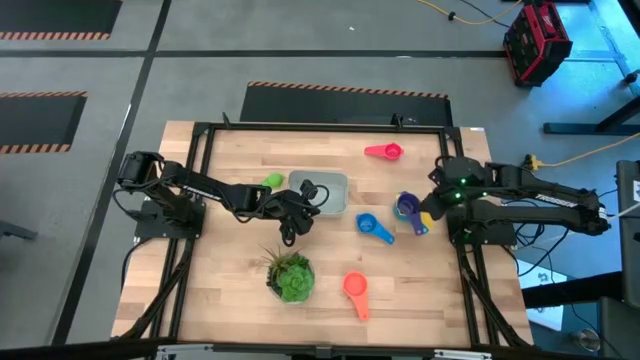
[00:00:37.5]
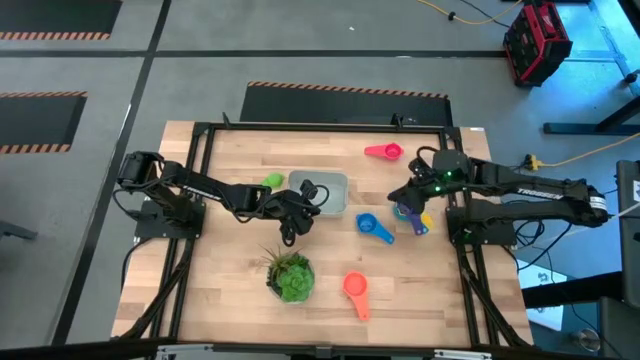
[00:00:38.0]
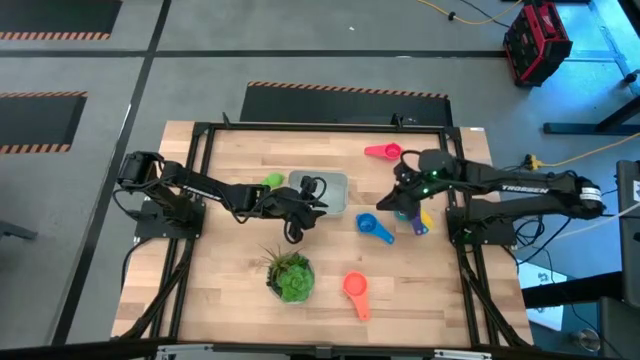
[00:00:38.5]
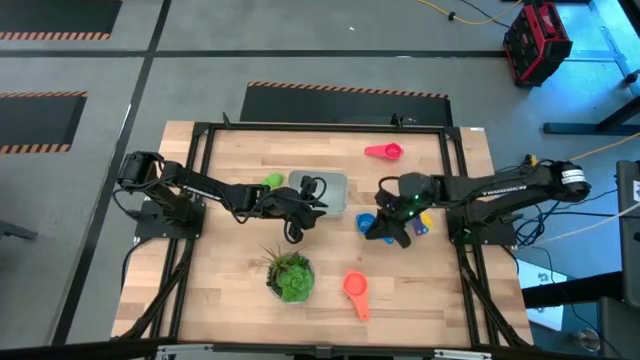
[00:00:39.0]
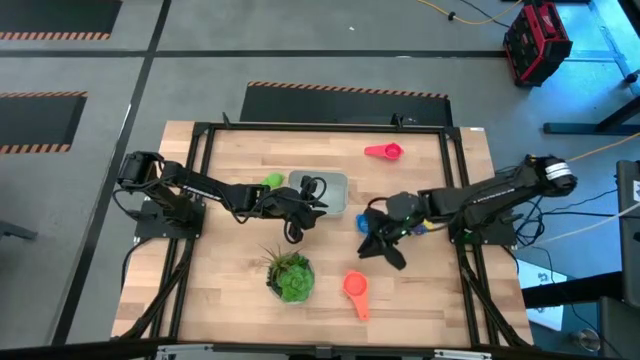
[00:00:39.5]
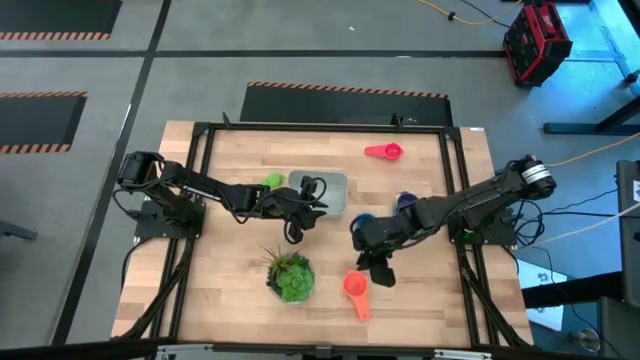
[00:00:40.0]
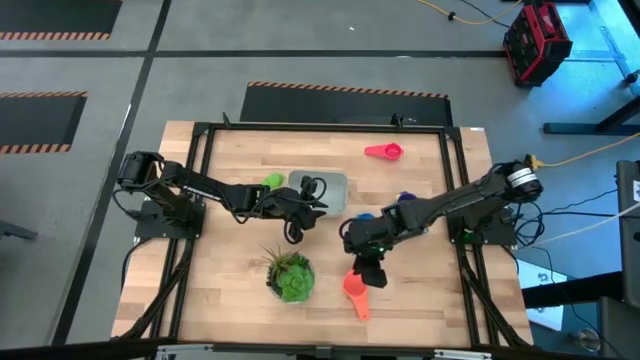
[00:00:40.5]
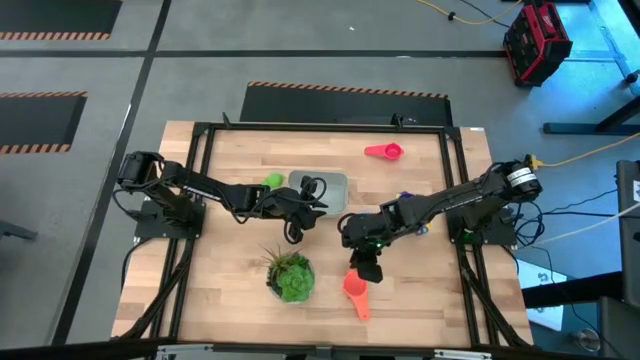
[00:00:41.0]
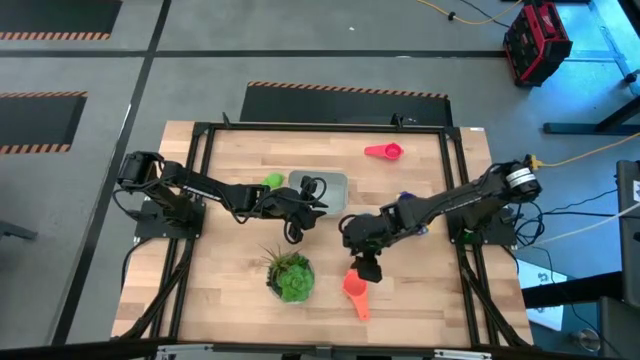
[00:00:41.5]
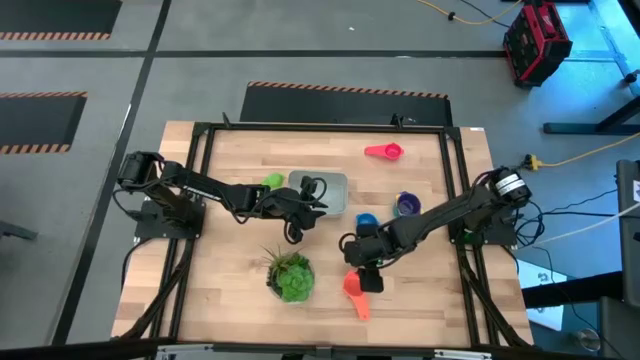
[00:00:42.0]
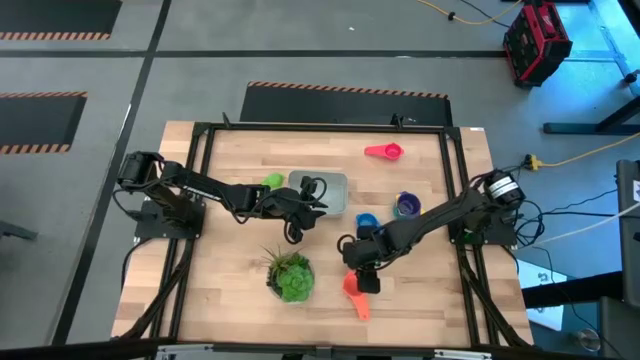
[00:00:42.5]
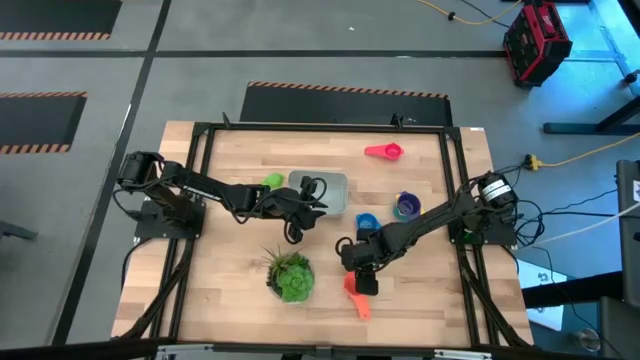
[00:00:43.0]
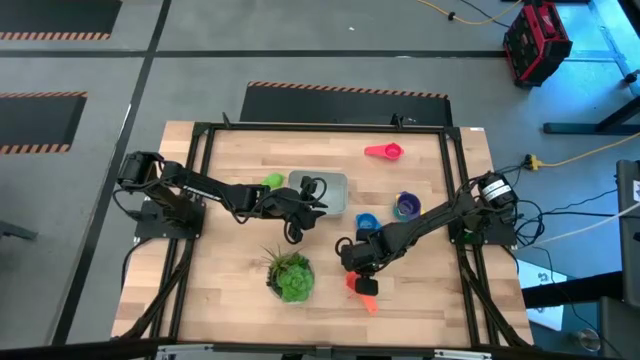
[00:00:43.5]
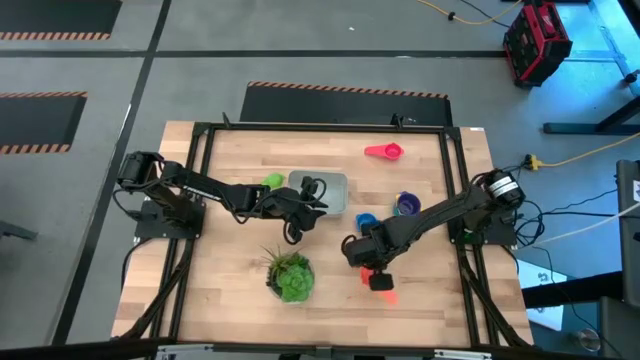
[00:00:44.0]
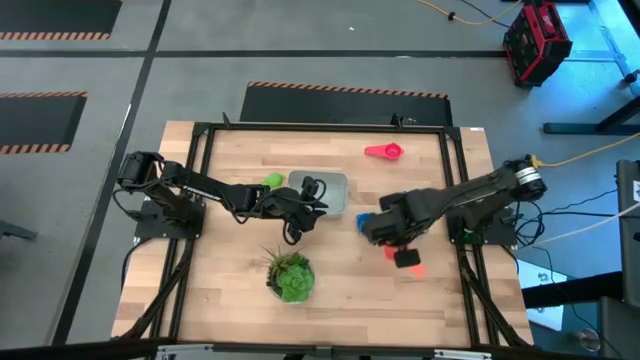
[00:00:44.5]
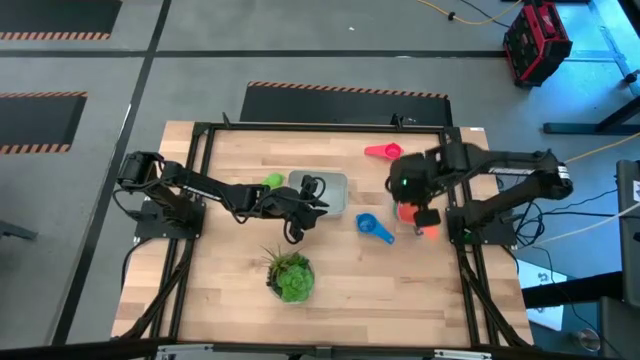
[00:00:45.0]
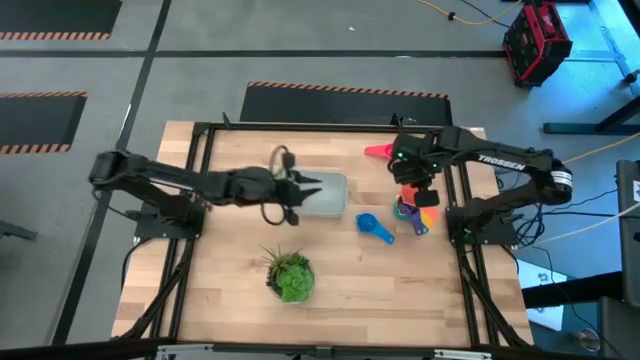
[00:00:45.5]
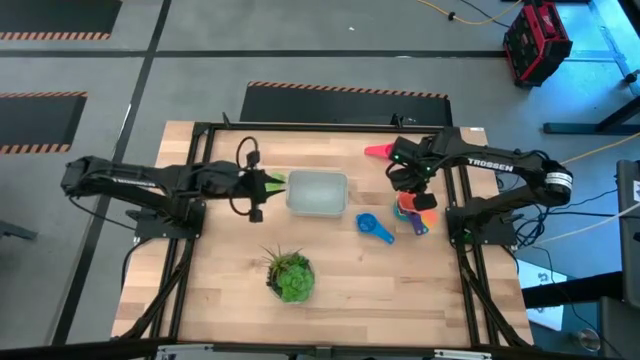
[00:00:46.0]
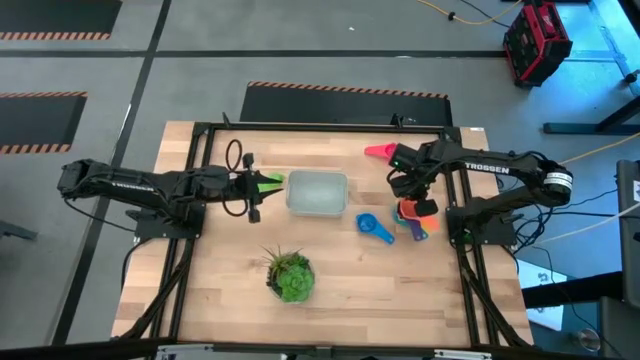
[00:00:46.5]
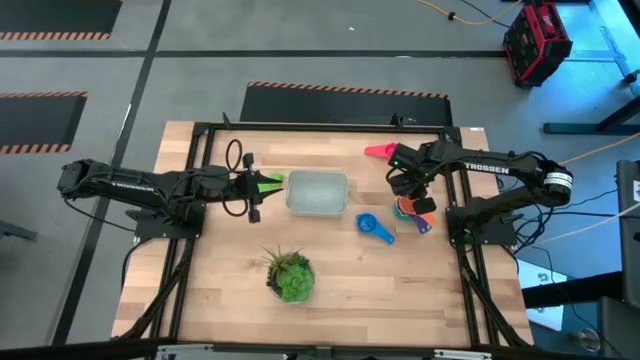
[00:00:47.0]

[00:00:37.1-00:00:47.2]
Task: Nest measuring cups in basket
Stack the orange measuring cup on top of the the violet measuring cup

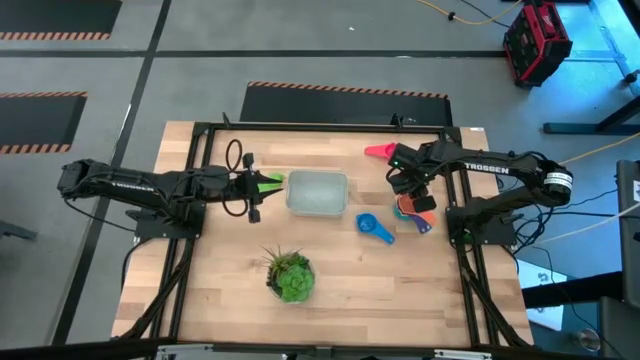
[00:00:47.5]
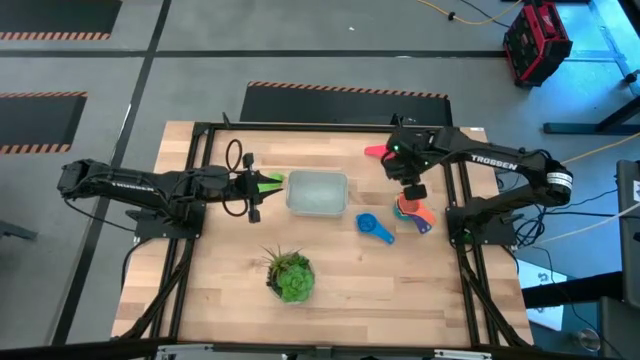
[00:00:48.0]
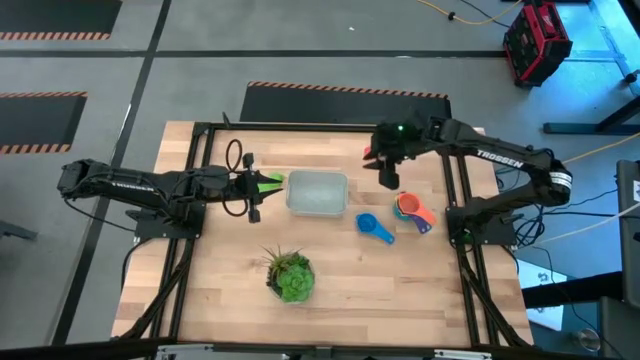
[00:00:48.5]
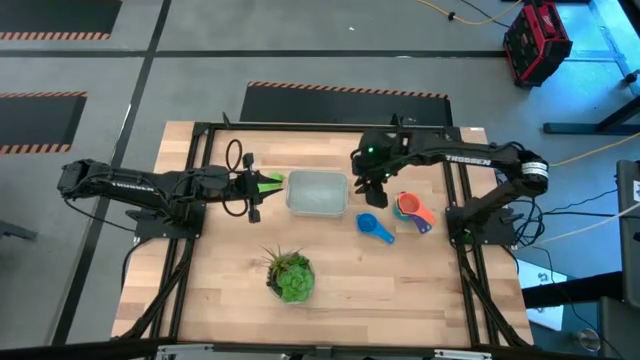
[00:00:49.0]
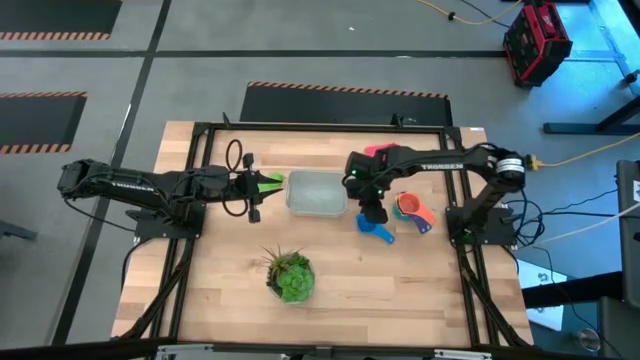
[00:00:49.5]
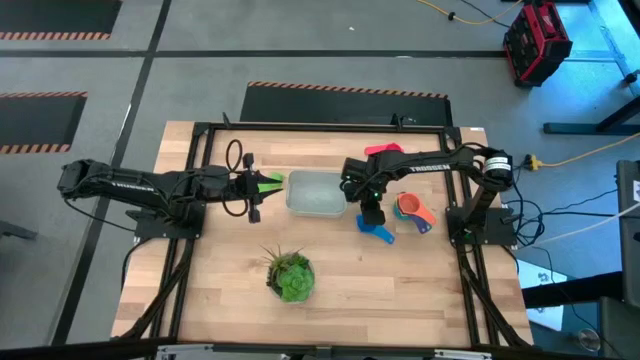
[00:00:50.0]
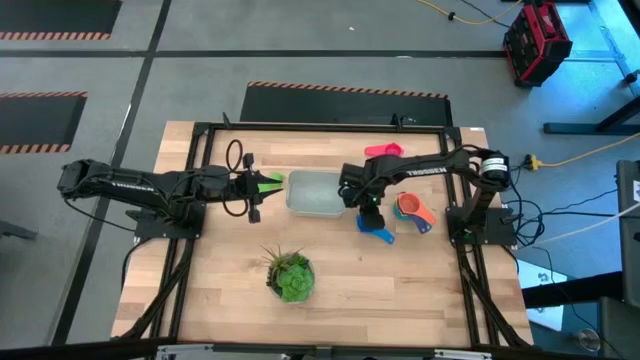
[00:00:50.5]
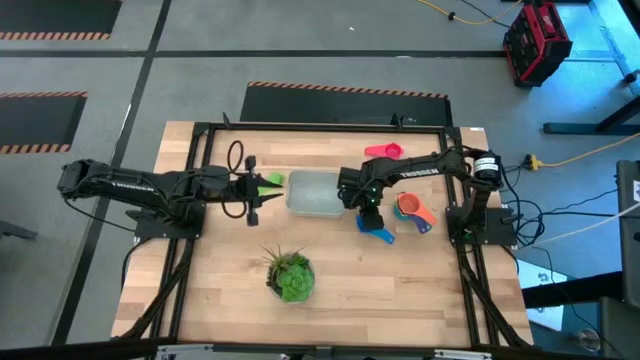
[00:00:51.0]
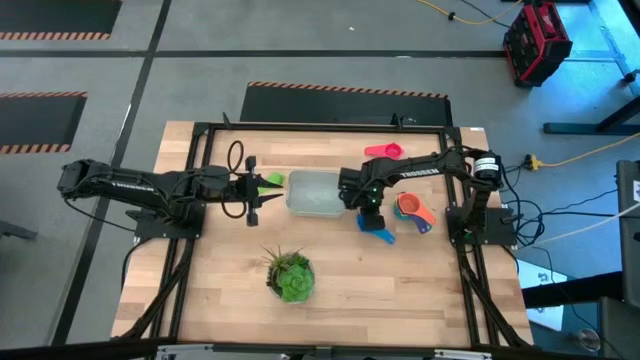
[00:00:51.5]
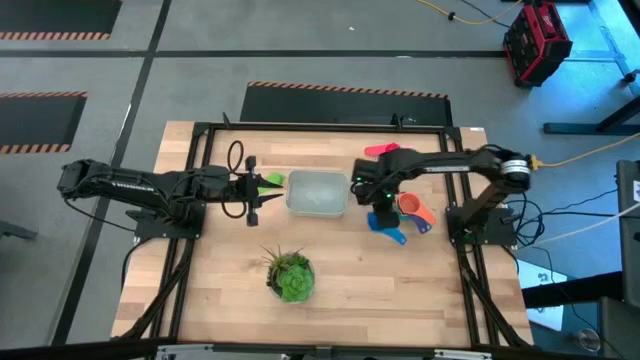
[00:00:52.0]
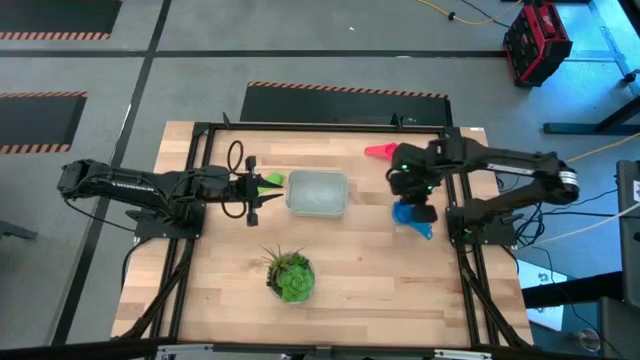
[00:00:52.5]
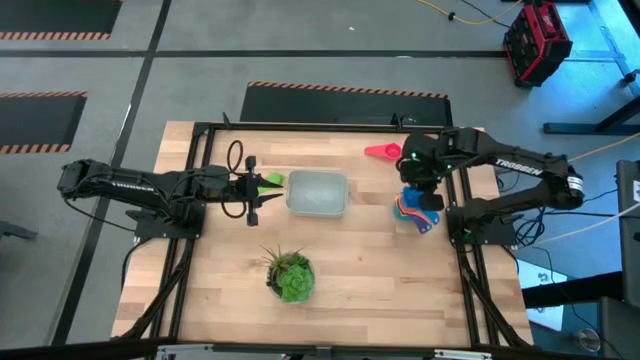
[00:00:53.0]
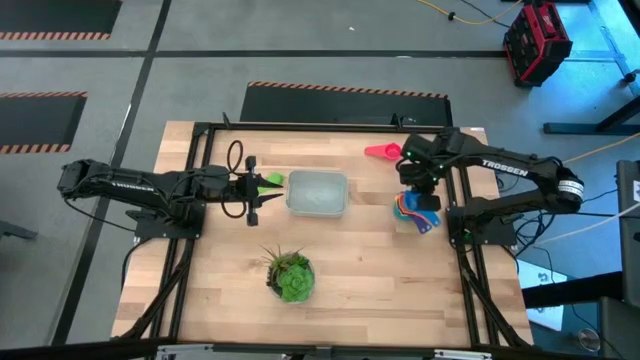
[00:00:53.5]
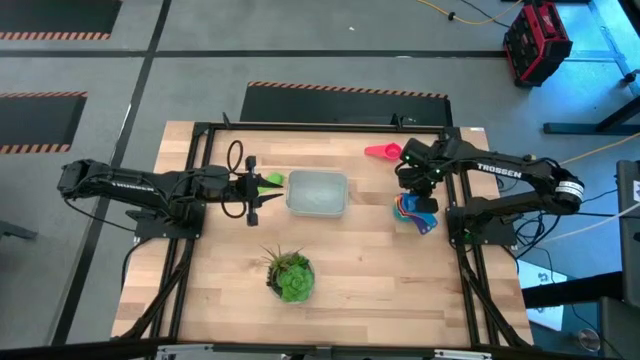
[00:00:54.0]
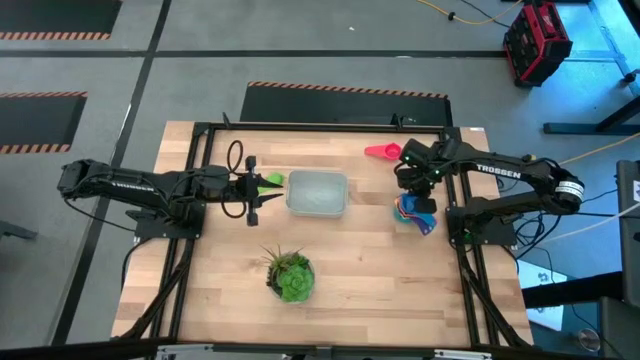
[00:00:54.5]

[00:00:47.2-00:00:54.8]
Stack the blue measuring cup on top of the the orange measuring cup

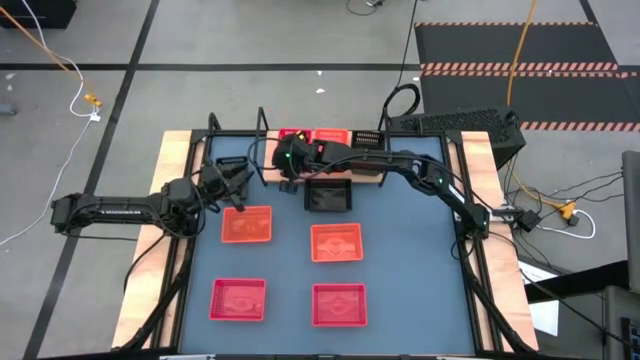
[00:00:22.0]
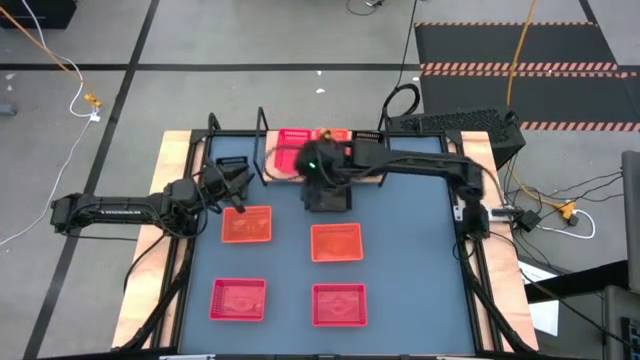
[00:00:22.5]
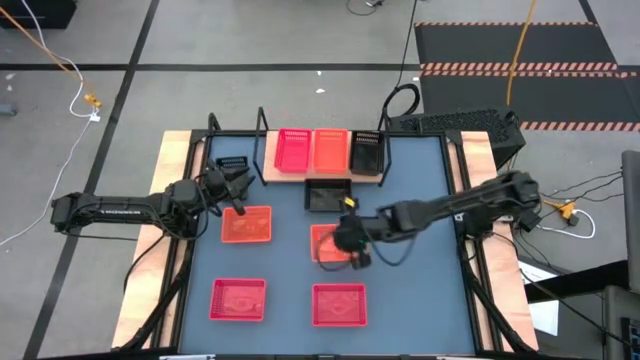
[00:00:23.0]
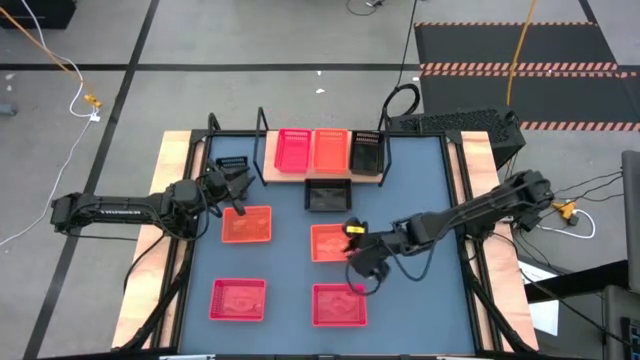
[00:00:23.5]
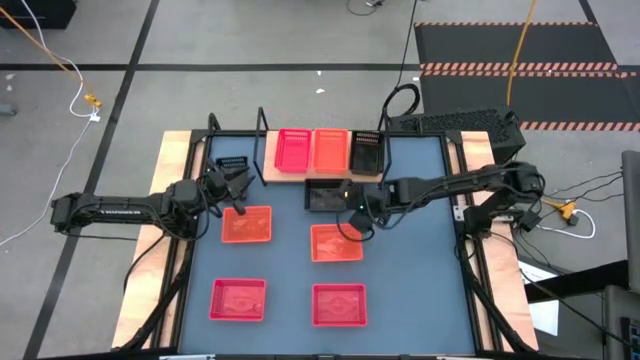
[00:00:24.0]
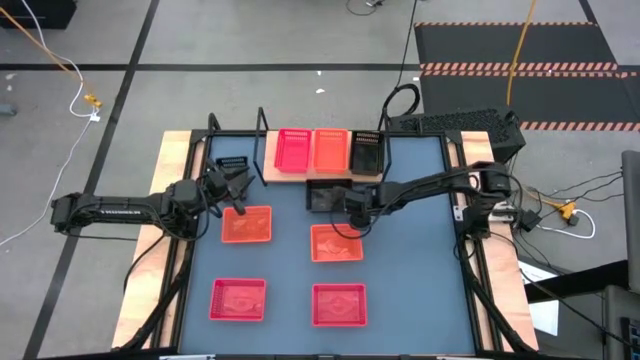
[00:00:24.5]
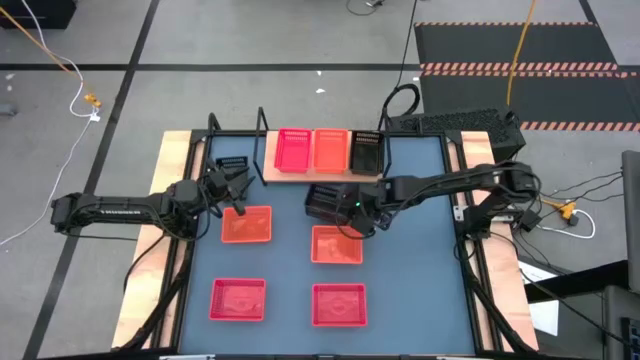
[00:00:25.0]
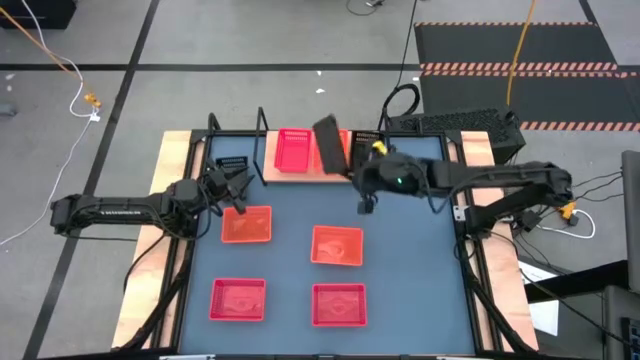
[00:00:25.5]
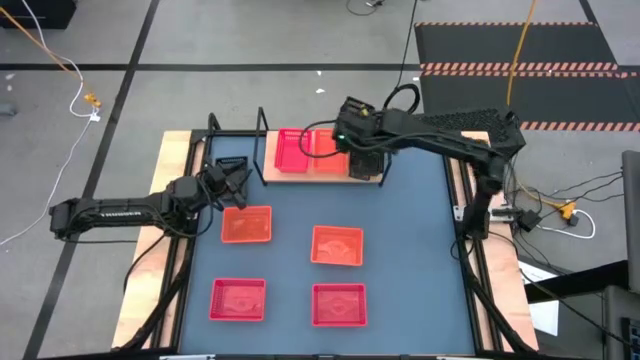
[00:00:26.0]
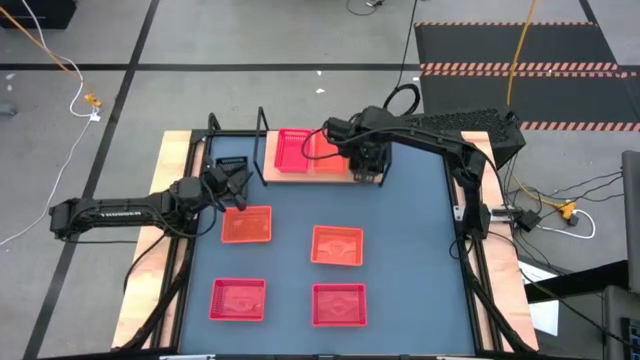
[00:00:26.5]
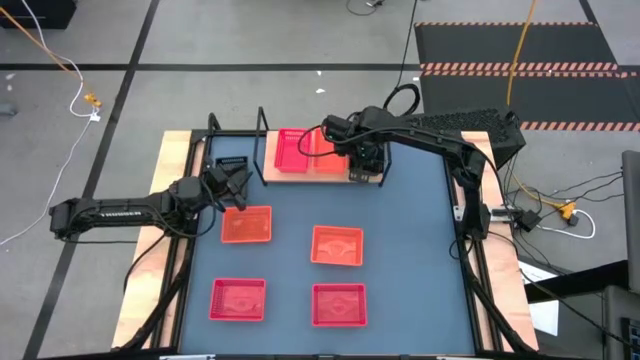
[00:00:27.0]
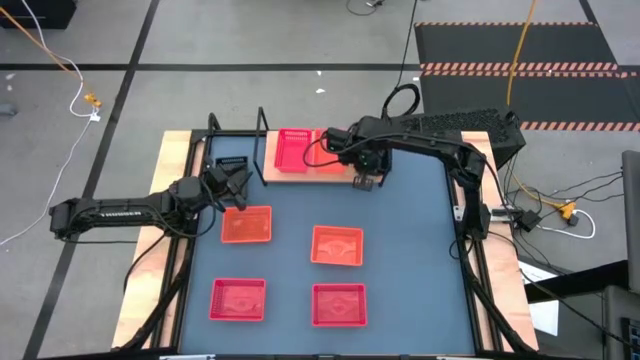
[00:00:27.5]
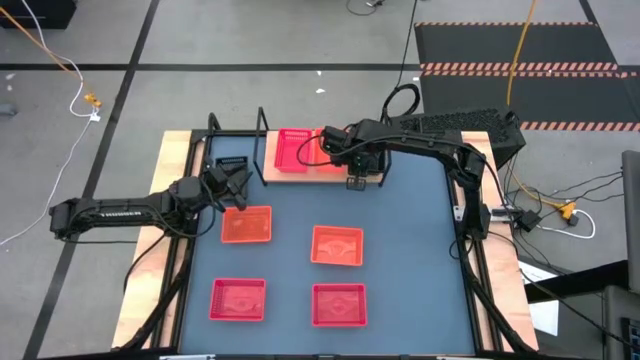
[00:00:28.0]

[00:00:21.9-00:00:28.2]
Task: Stack baskets on shelf by color
Stack the right black bin on the black bin on the shelf
